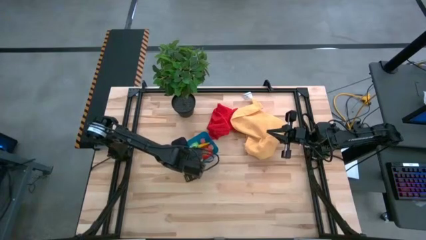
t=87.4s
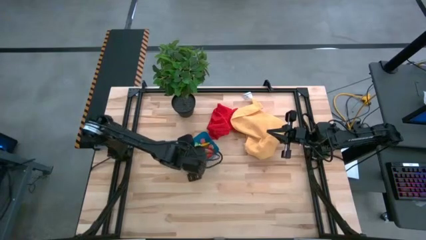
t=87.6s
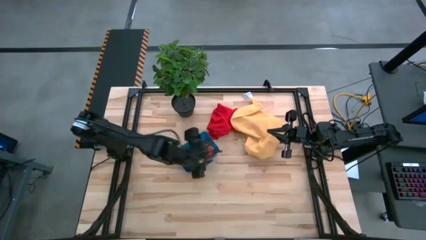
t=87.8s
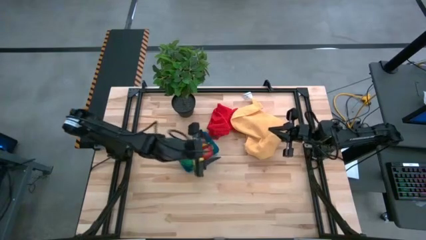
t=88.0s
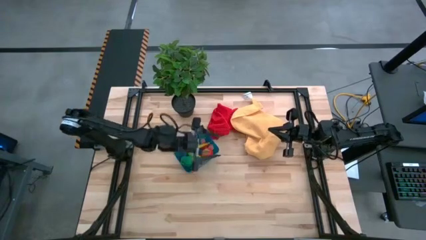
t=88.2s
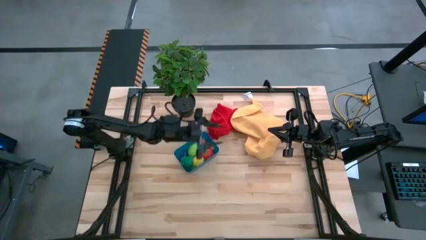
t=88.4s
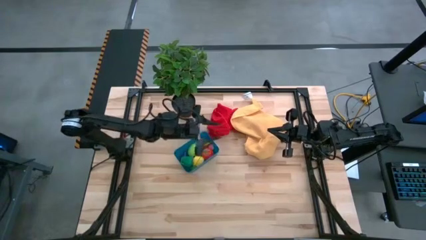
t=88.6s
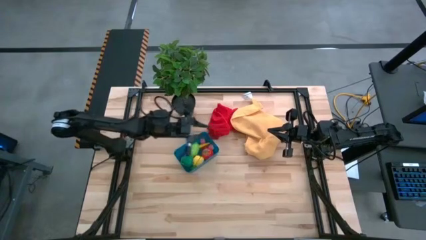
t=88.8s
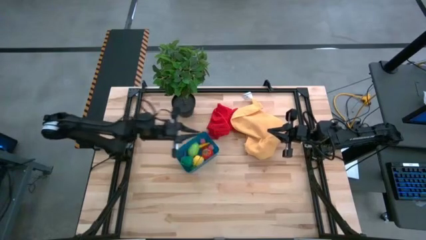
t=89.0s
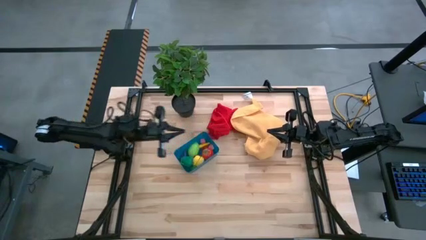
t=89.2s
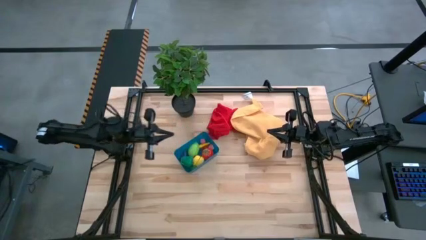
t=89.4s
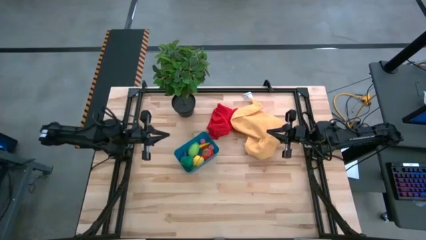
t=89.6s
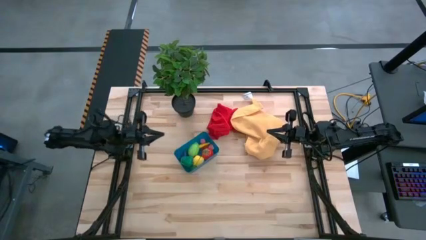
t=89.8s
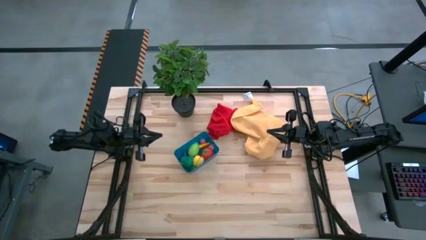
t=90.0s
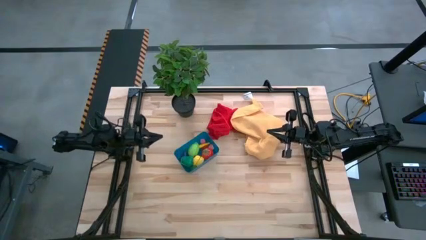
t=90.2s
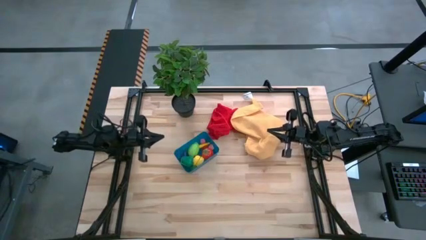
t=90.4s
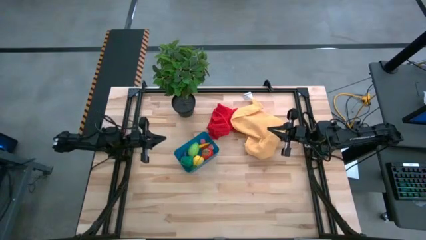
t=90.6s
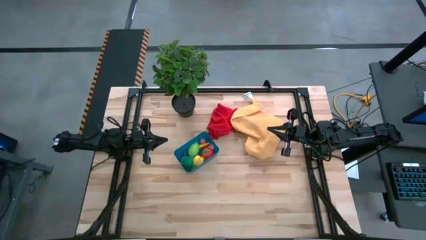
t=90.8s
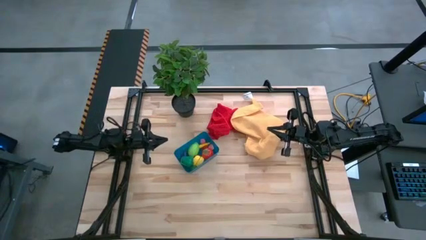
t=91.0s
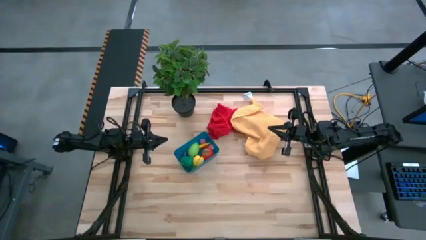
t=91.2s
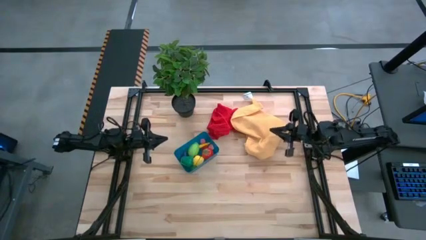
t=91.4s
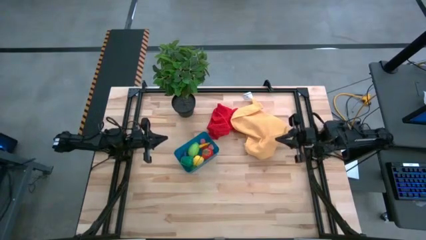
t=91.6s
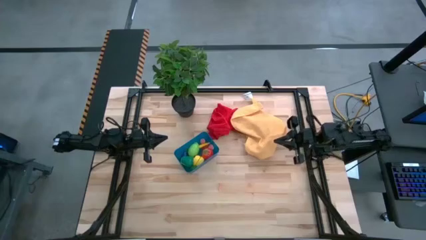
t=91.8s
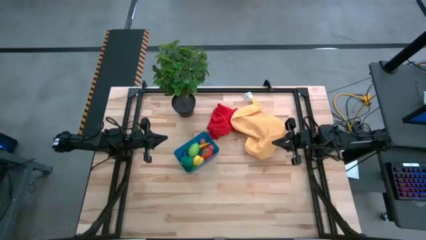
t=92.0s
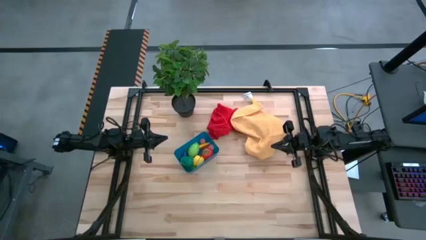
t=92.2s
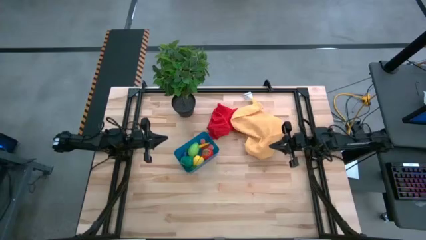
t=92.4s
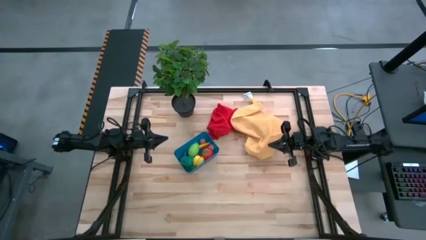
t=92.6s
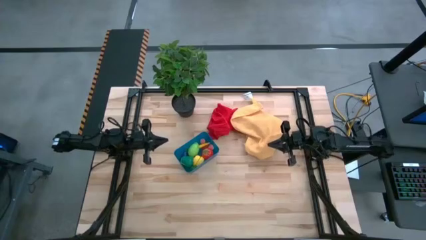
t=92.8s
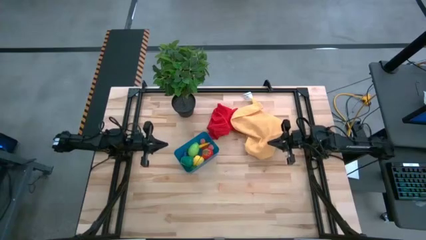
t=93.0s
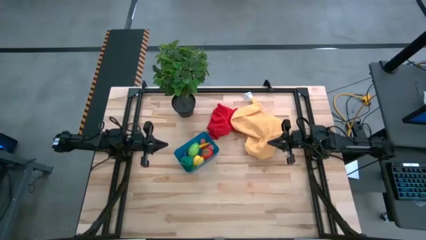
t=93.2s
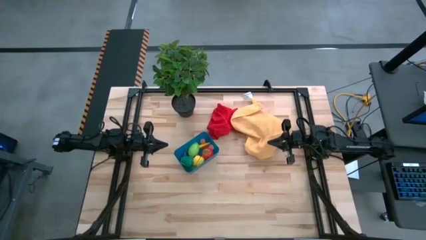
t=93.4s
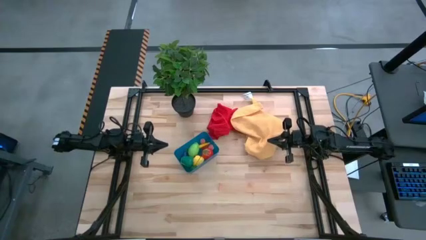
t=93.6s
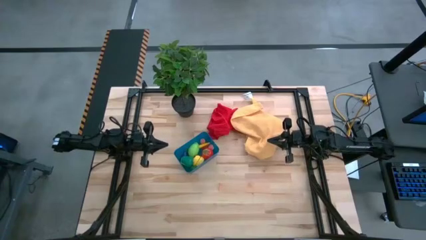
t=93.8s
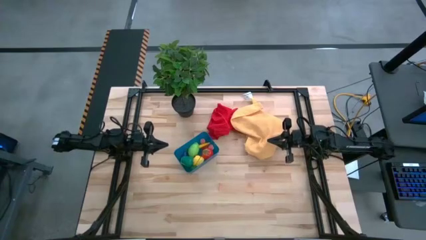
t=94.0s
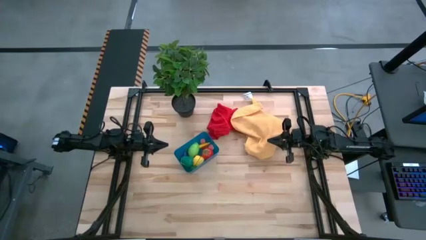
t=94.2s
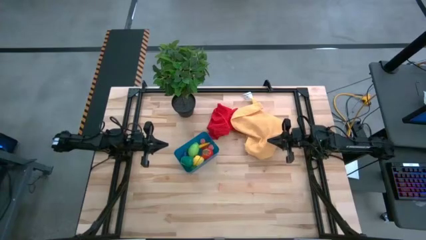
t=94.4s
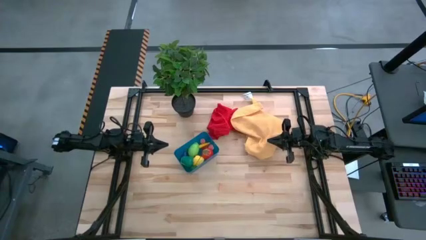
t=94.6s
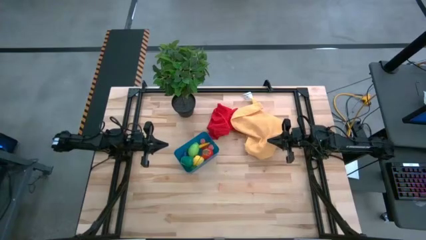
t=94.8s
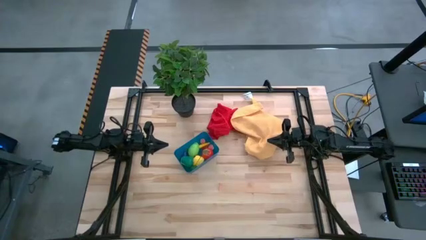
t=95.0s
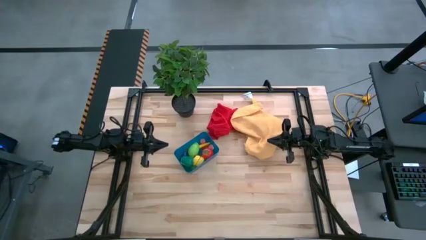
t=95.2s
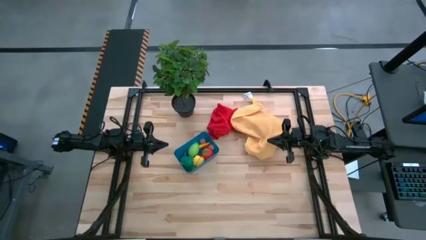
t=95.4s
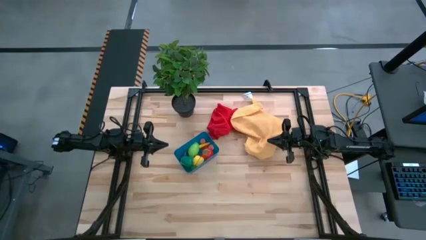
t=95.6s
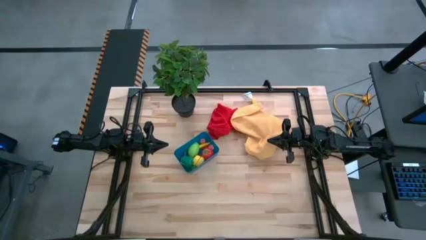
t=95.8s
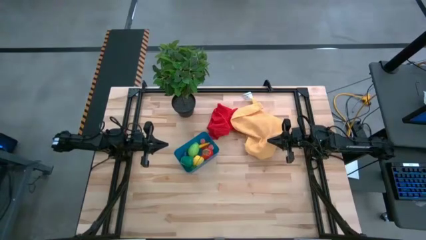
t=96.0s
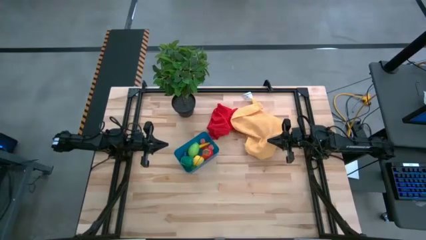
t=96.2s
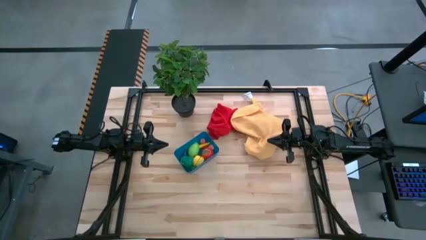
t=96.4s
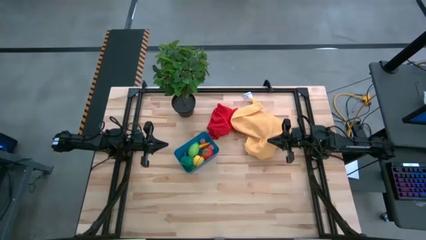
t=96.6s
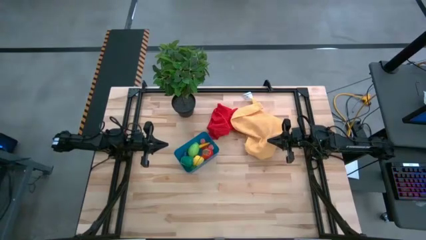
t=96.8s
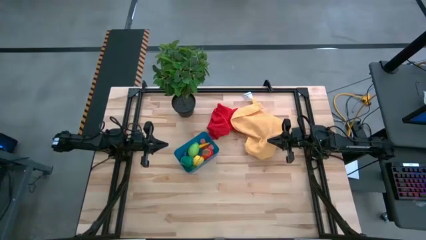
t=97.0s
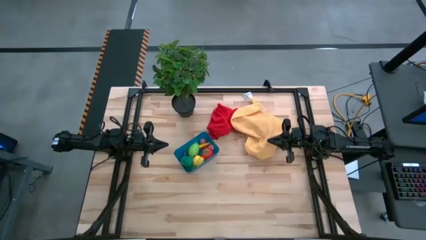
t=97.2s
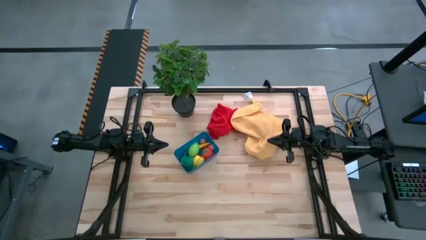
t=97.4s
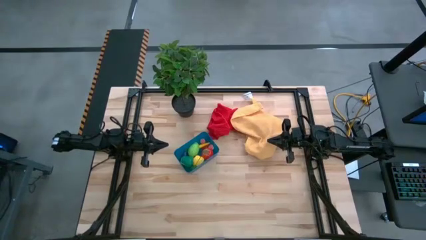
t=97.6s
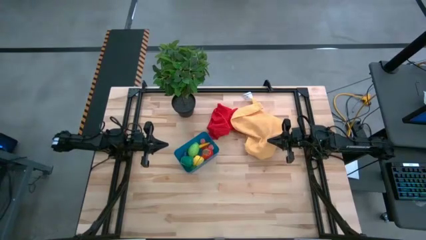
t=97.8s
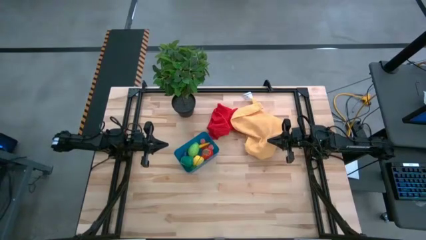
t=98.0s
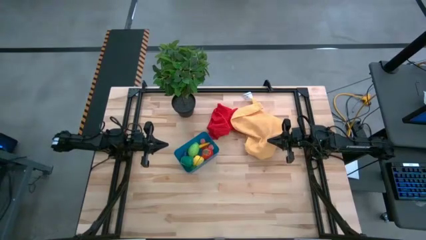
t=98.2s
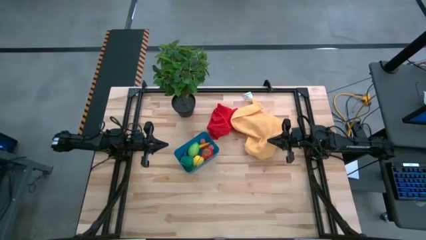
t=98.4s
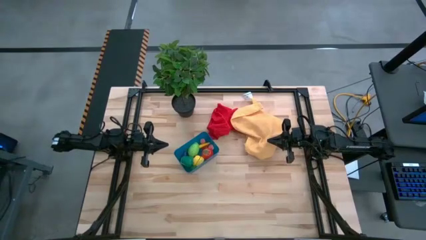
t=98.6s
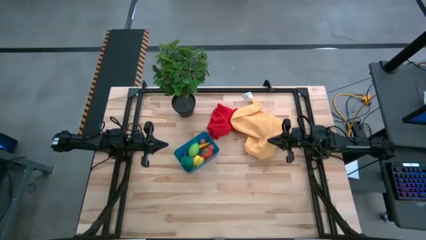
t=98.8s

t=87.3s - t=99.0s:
Task: Pick and placing Produce into tupperware
Return to Home Position

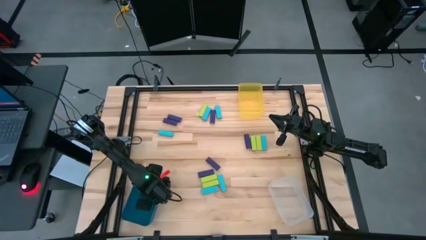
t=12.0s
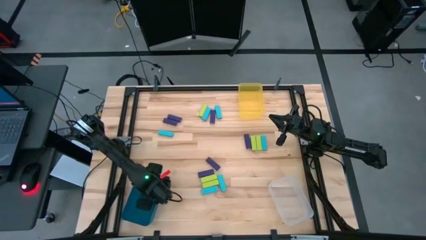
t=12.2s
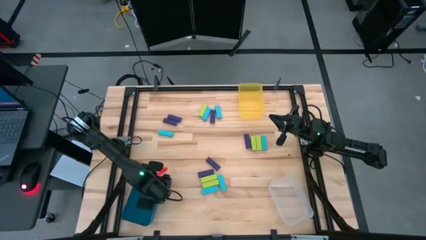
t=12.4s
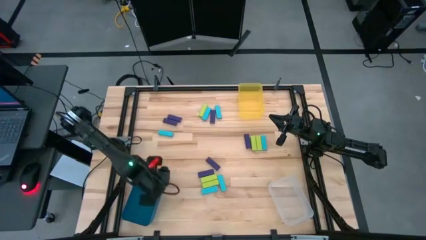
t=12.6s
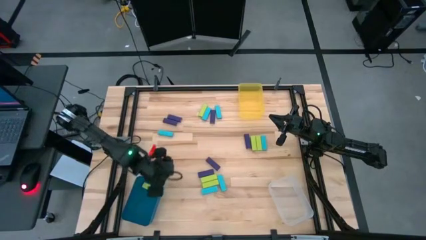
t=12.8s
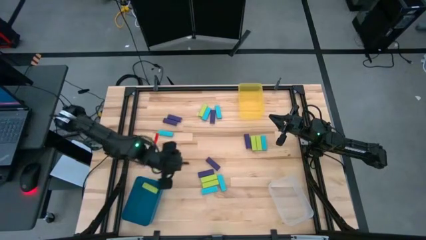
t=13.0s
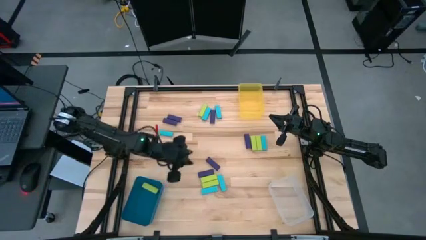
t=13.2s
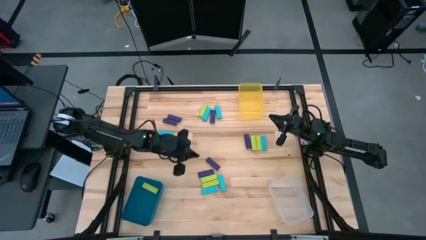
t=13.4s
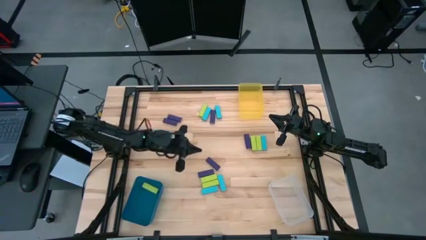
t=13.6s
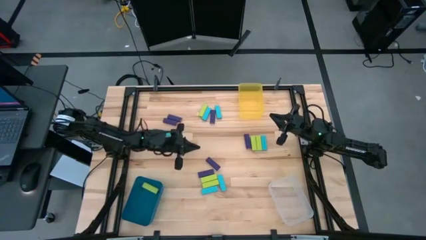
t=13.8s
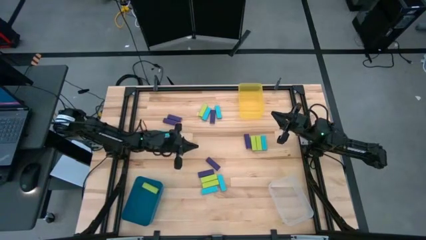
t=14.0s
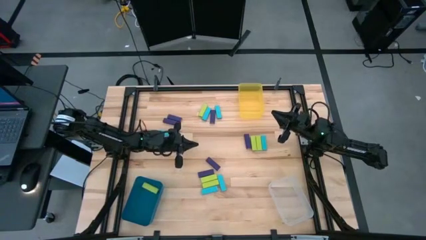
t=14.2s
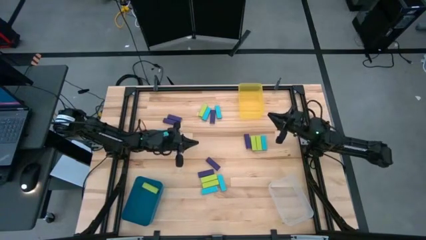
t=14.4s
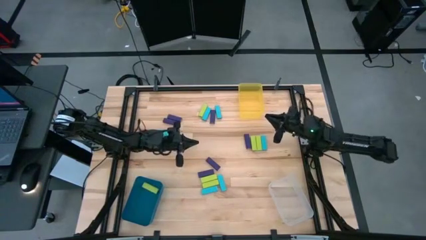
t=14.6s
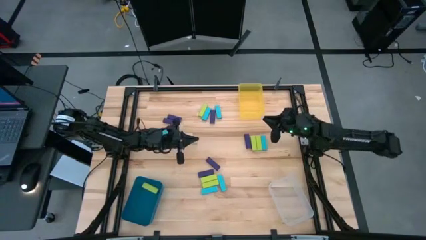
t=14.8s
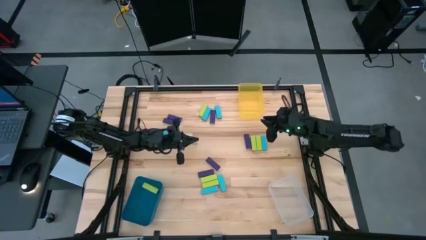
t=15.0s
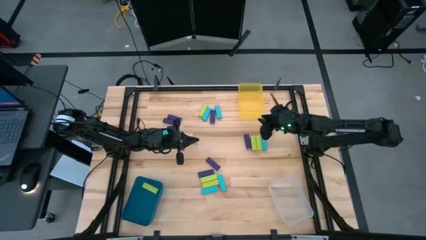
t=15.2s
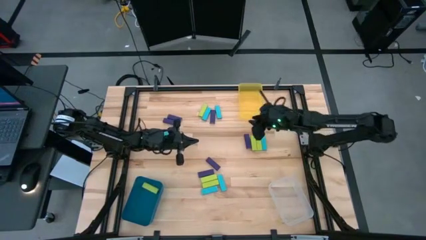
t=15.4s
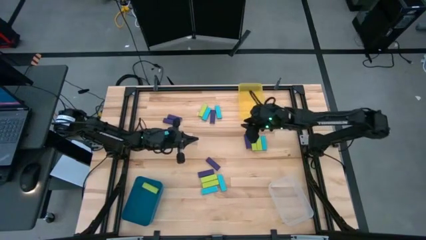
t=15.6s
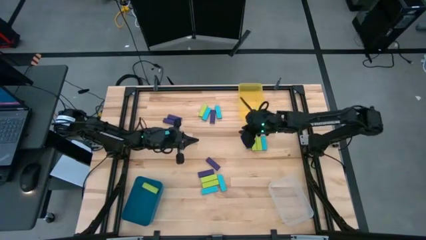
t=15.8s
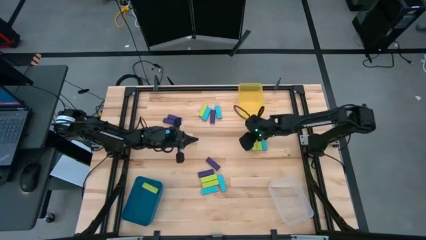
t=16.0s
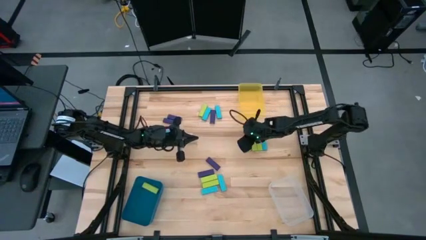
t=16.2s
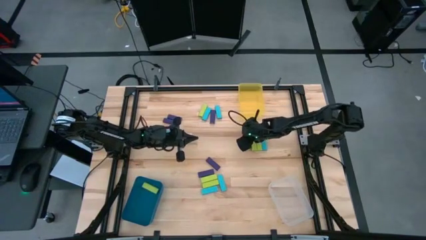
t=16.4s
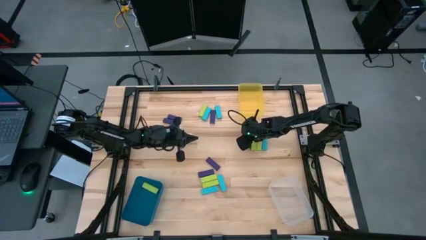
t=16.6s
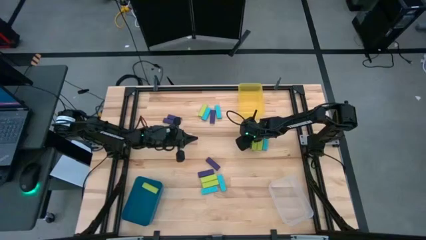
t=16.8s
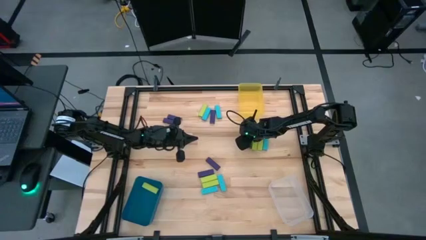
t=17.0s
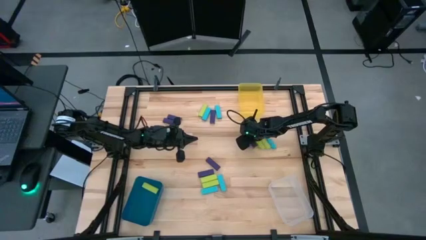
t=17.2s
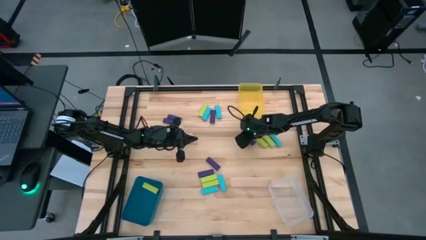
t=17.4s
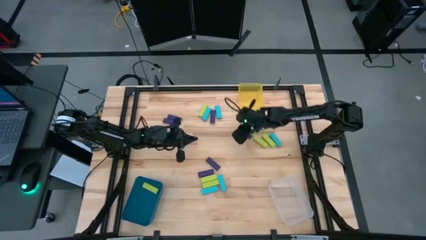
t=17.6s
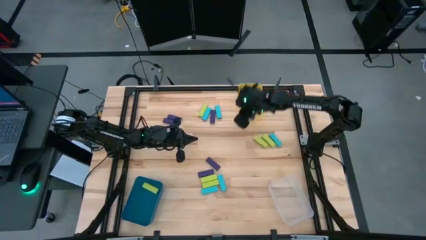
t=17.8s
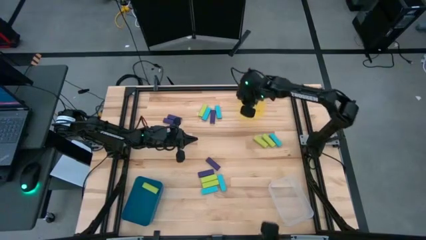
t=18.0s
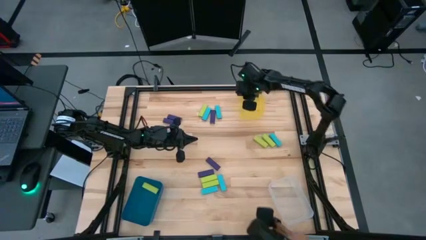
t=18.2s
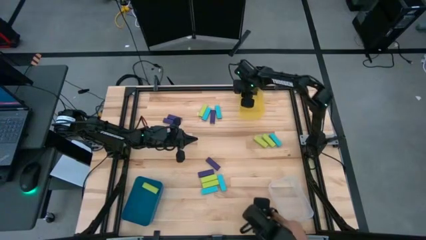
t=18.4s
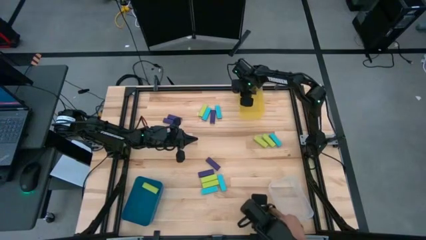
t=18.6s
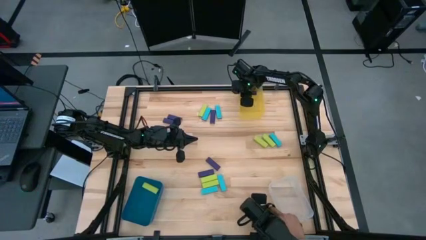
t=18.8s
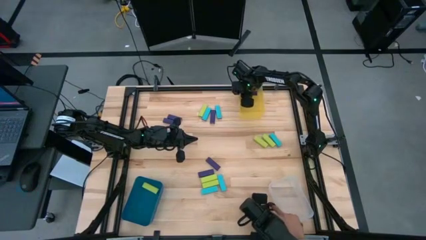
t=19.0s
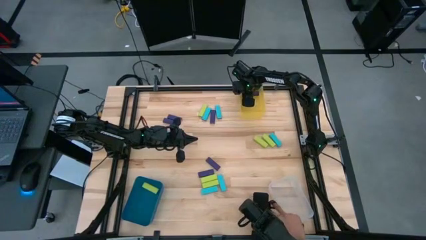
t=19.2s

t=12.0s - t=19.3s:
Task: Sort blocks
Put the violet block into the transparent yellow bin
